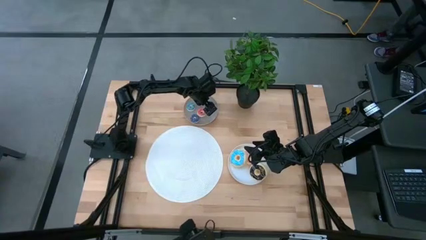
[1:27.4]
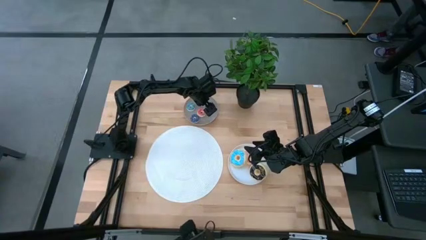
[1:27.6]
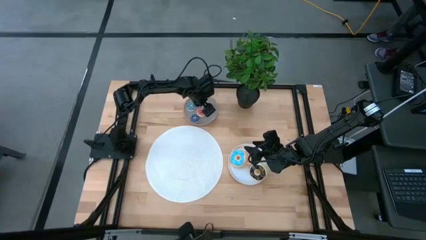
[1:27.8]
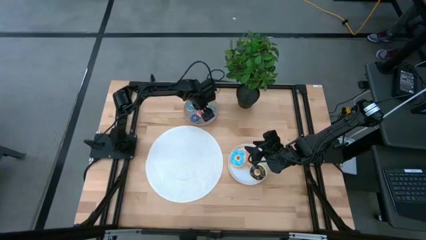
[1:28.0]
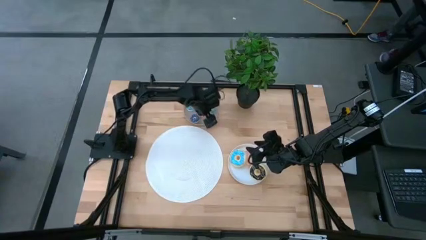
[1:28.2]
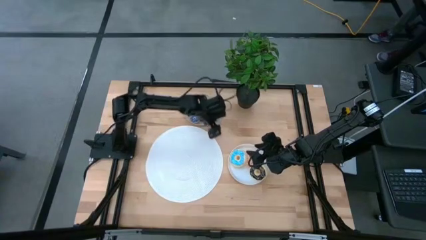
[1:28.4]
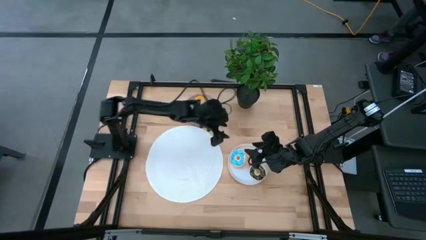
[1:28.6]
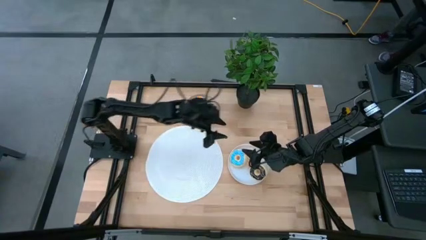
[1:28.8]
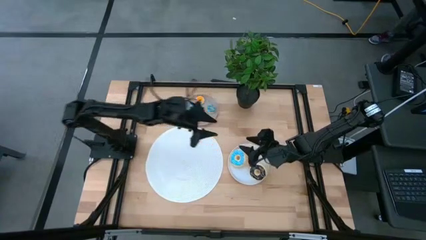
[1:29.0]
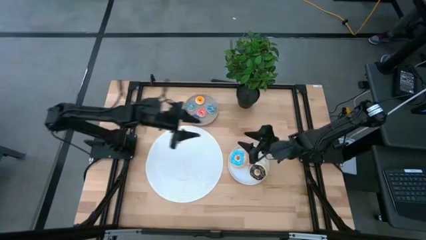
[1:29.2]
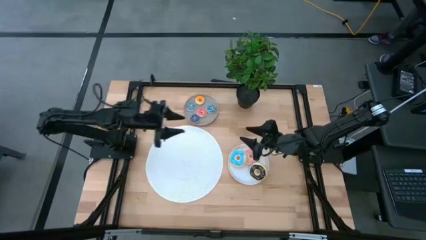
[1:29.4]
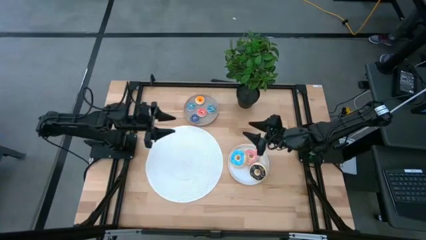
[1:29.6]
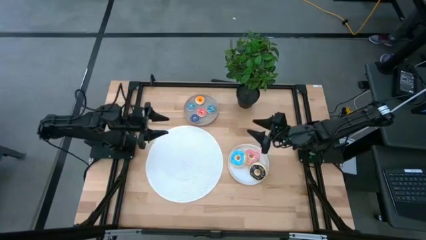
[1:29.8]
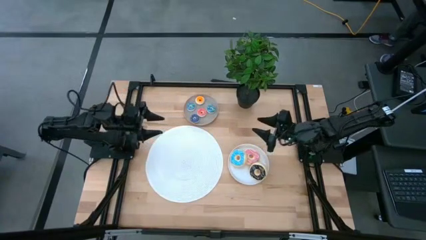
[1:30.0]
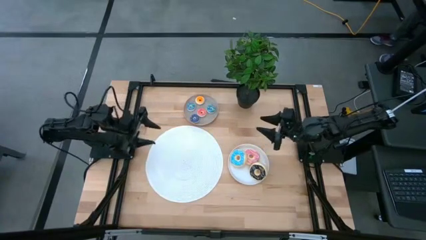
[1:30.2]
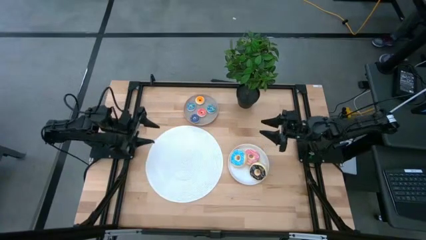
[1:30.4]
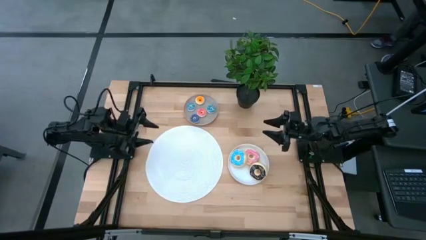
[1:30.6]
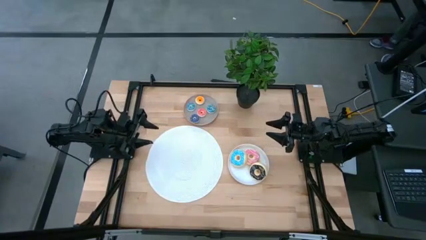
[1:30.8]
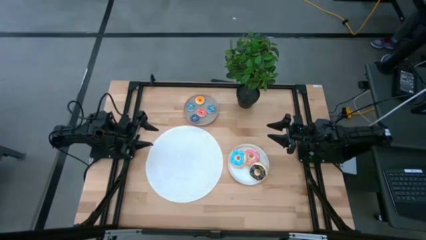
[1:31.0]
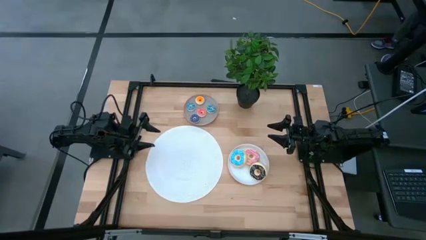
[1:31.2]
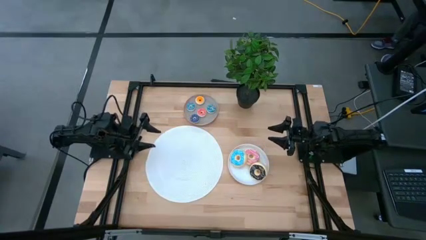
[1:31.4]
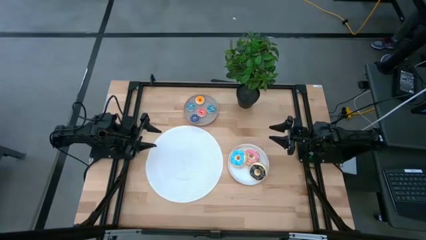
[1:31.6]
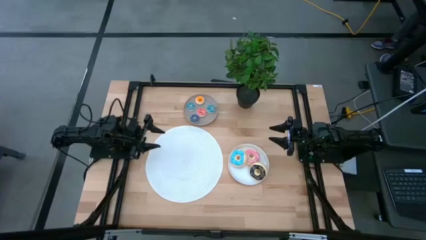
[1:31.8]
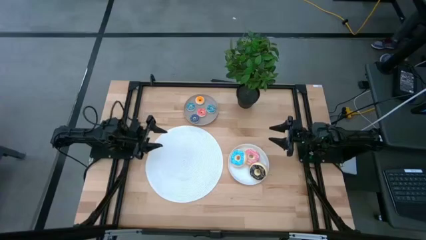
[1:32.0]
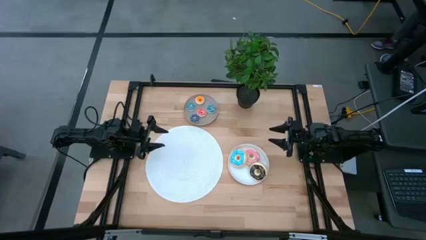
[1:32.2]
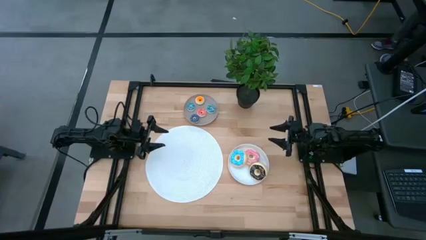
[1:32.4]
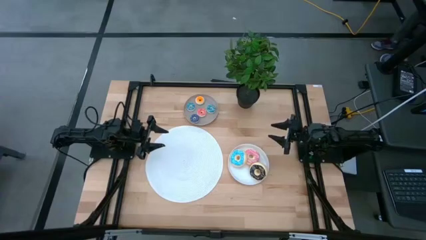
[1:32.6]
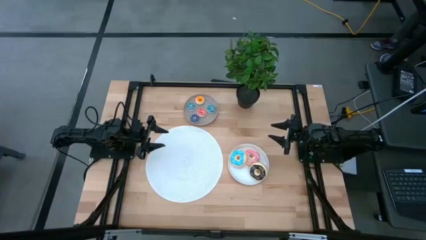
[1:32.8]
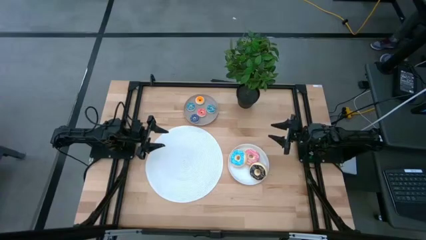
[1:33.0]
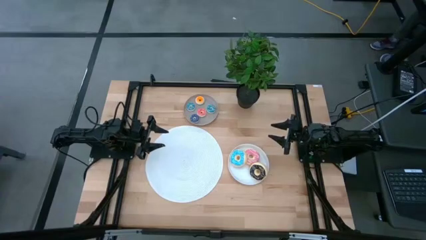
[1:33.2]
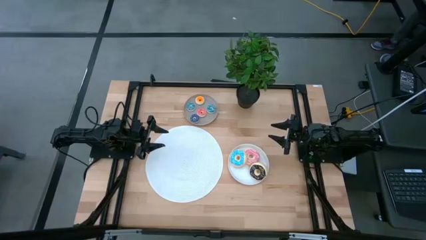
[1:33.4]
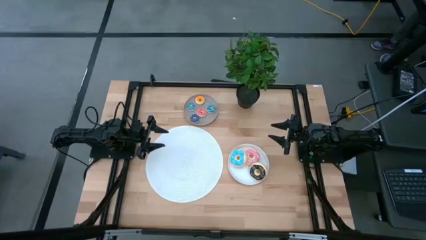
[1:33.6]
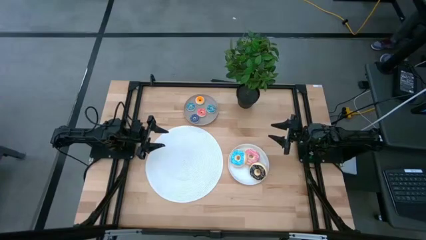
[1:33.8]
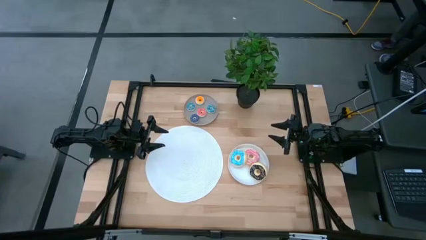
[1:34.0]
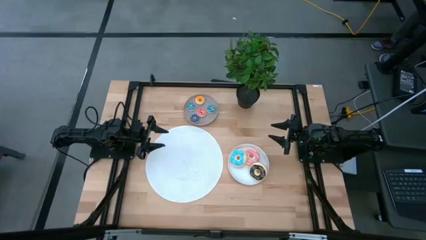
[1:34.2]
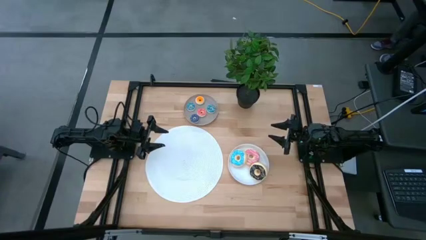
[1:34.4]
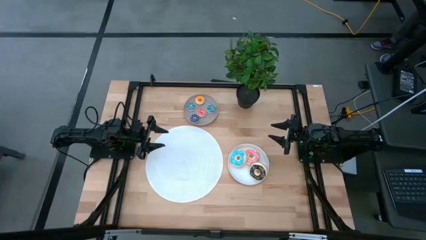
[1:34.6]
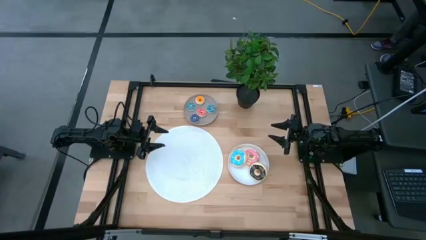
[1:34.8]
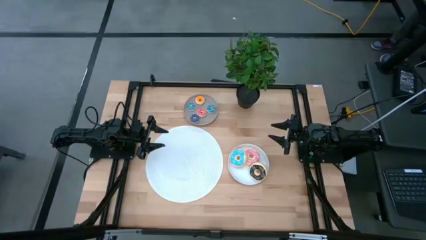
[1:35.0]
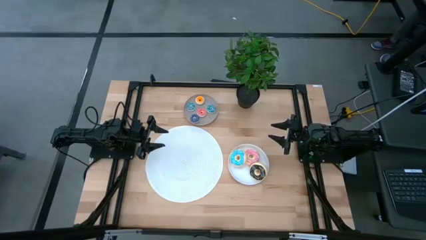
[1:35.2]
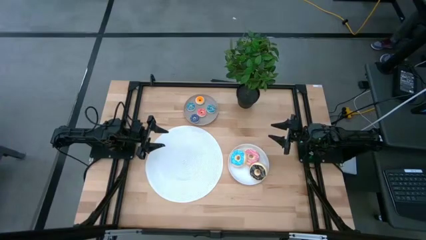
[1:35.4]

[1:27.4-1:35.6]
Task: Pick & Place donuts
Return to Home Position

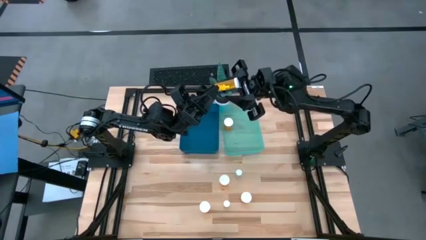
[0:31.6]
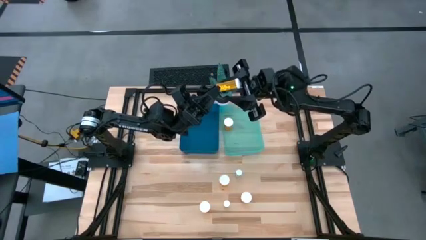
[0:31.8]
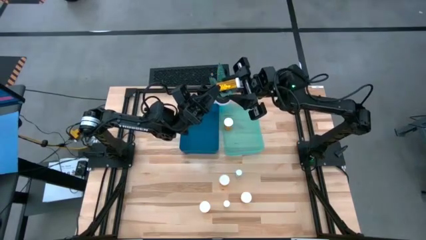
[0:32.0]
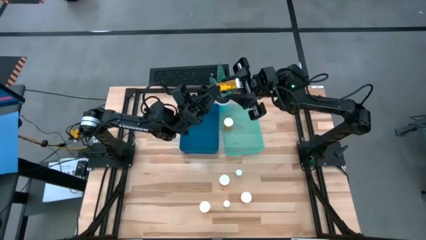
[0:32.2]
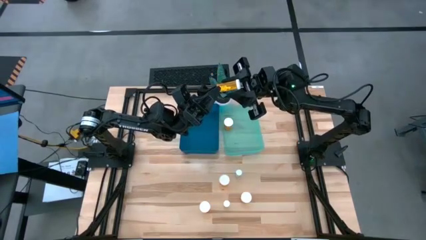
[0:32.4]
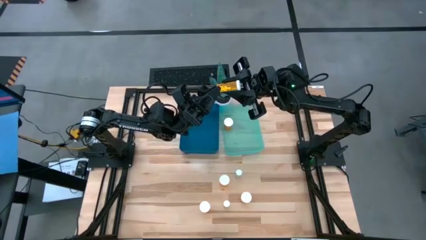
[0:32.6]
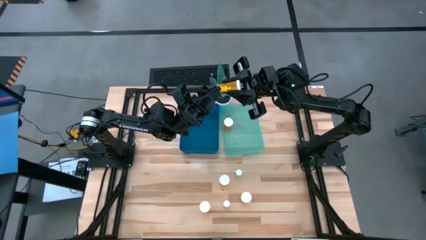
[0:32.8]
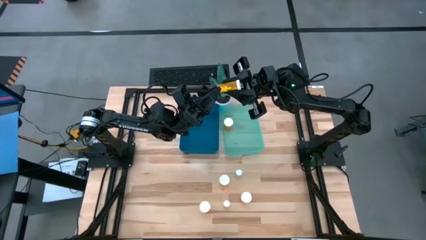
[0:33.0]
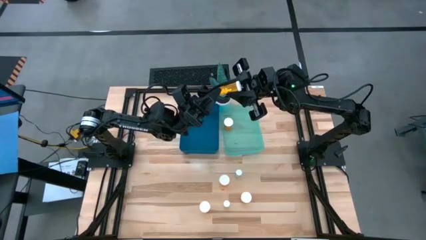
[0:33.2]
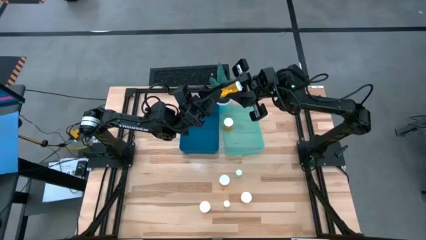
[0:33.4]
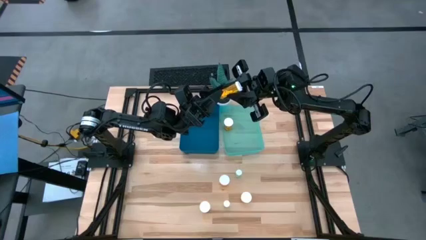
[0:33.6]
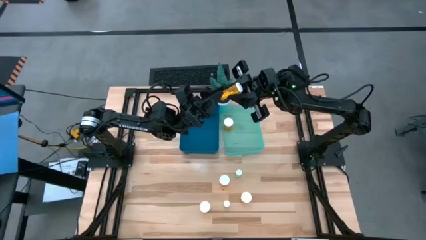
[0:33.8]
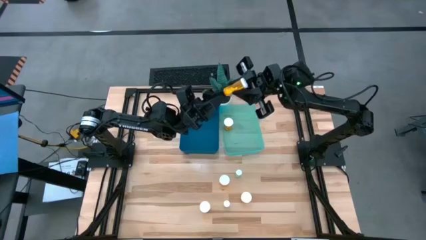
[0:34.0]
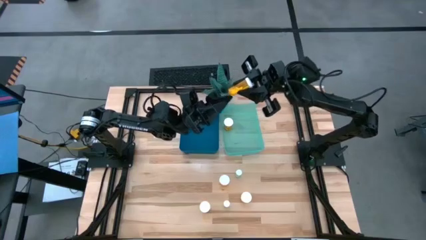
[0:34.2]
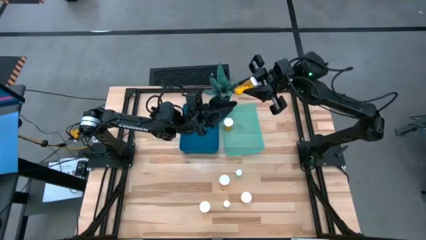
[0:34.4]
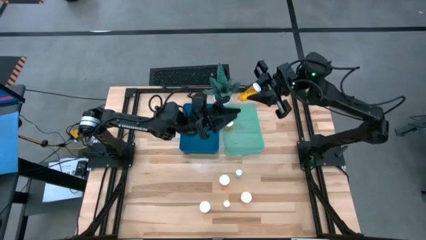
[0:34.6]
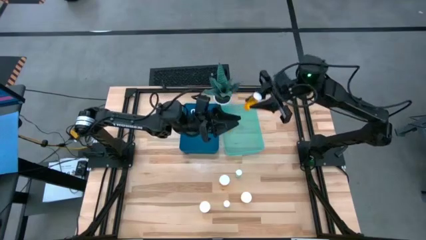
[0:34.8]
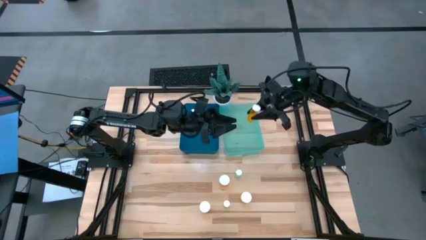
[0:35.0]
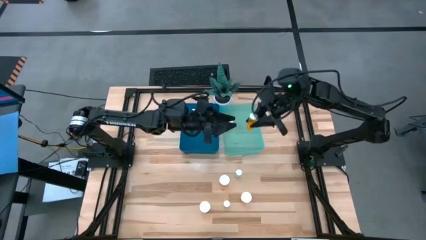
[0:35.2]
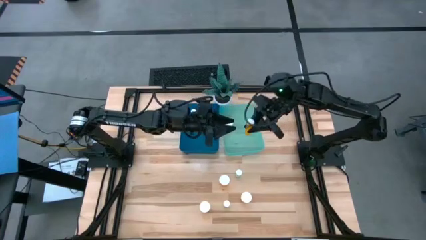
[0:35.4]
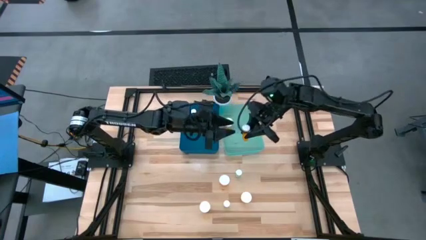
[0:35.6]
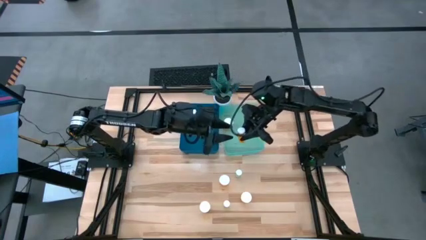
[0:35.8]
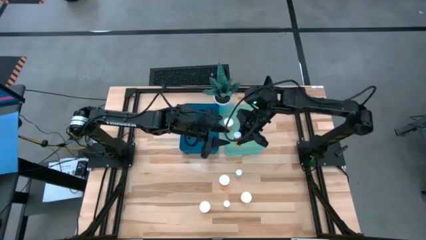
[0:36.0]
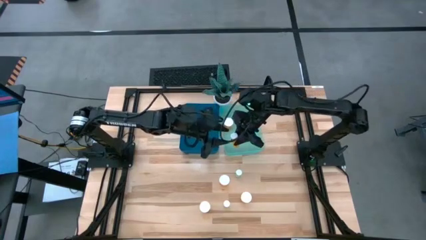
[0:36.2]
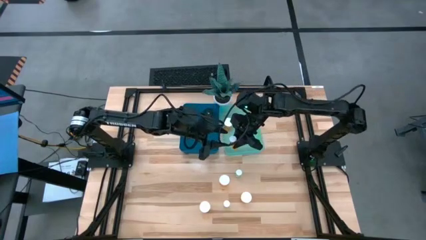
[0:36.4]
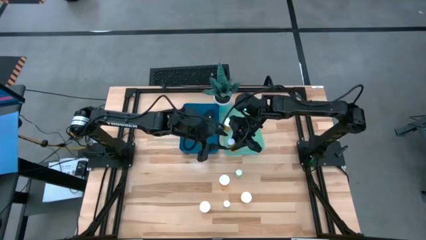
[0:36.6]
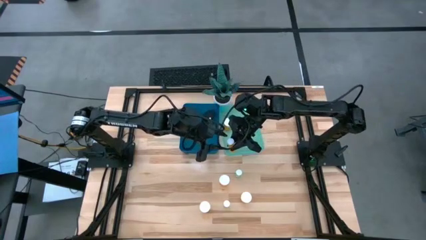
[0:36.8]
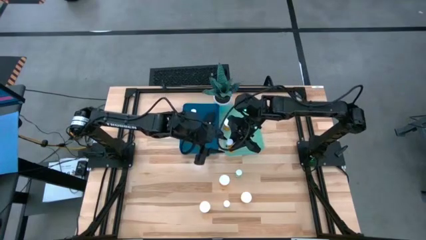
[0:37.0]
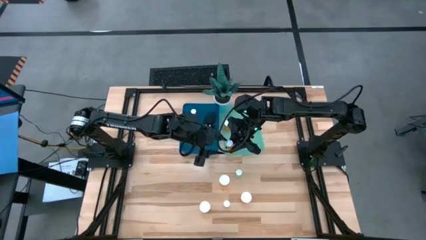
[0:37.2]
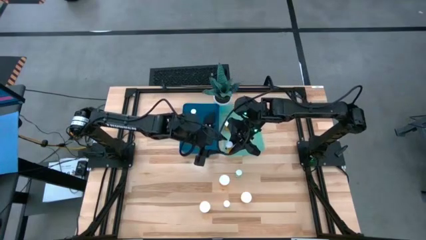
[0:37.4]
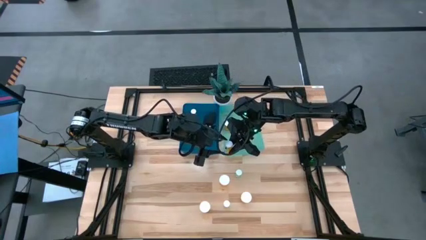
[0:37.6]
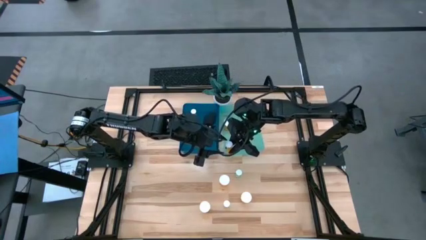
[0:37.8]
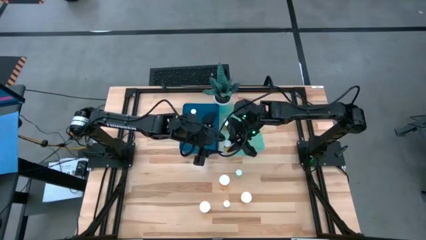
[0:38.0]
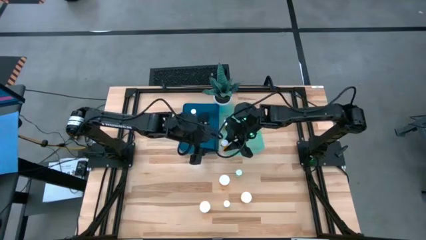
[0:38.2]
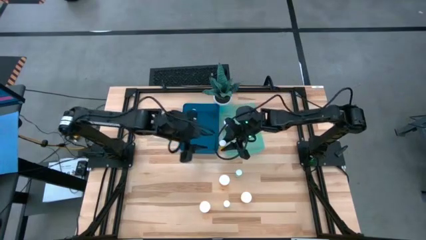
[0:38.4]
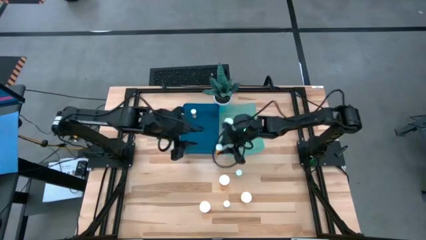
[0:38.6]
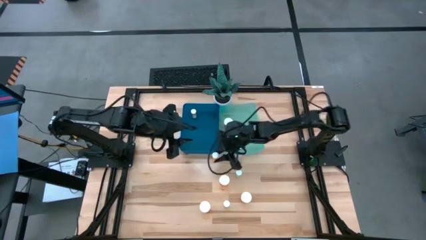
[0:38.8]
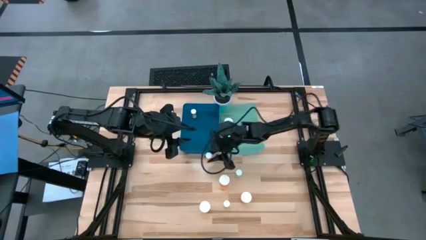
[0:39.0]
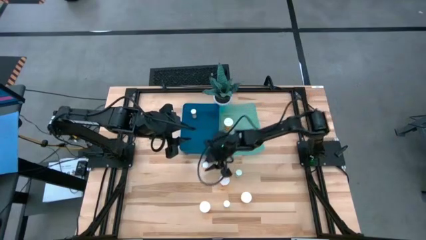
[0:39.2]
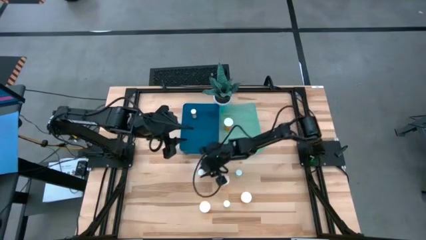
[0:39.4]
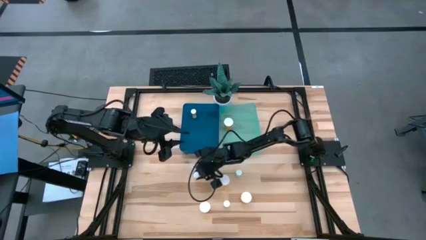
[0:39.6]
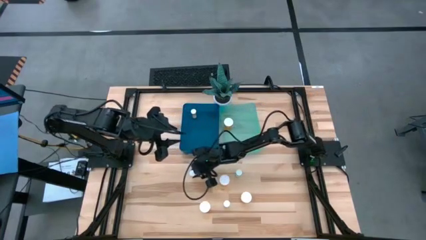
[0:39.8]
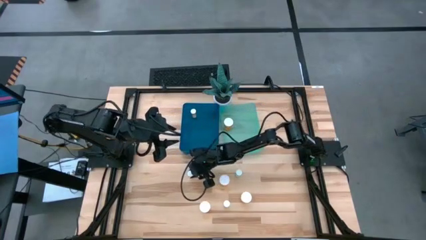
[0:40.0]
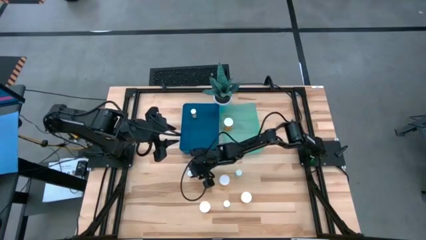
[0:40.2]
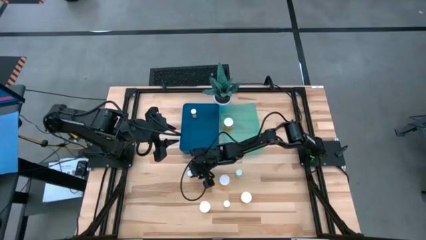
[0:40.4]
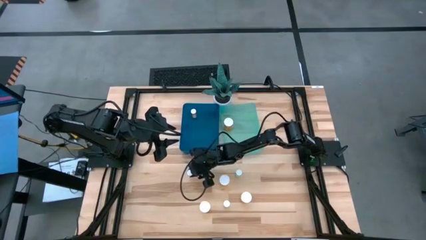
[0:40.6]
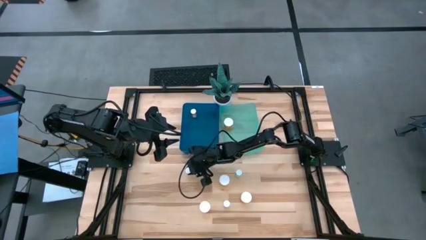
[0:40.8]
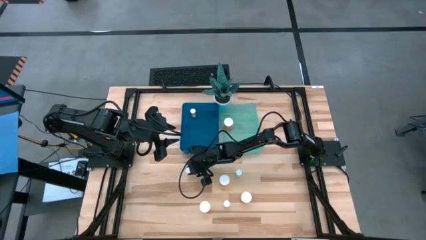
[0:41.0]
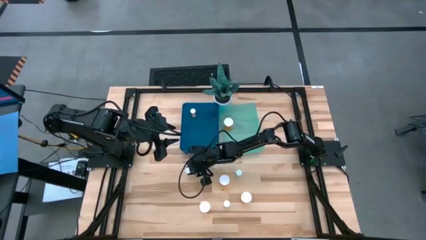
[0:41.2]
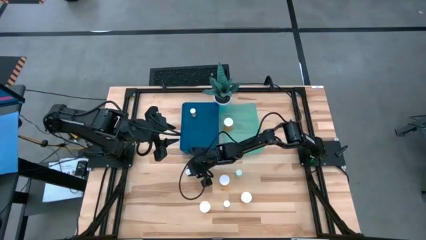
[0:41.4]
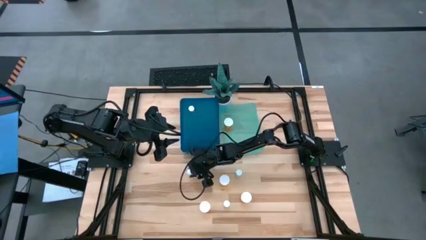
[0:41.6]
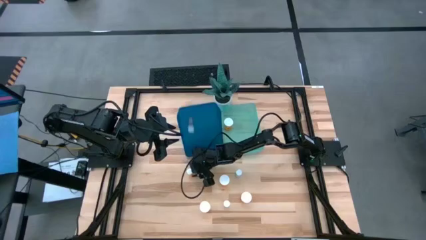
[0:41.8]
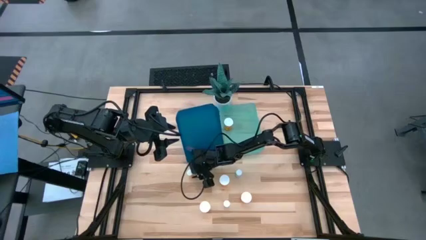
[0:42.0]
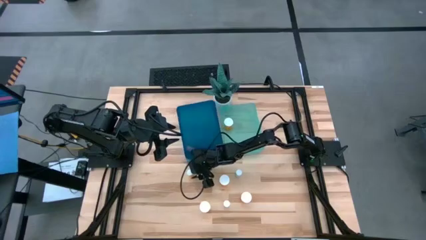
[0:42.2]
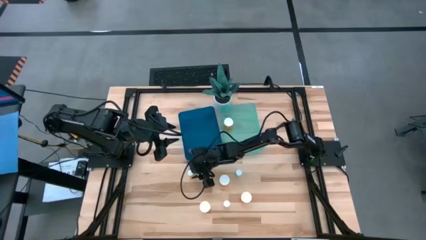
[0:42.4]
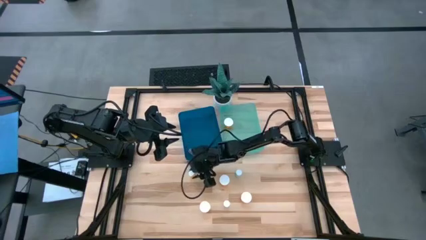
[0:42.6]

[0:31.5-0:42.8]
Task: Pick and place medicine bottles into bin by pill shape (circle, oval)
Put the small orange tablet bottle into the blue bin
